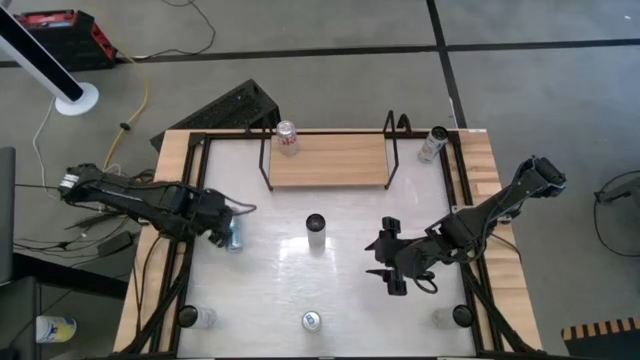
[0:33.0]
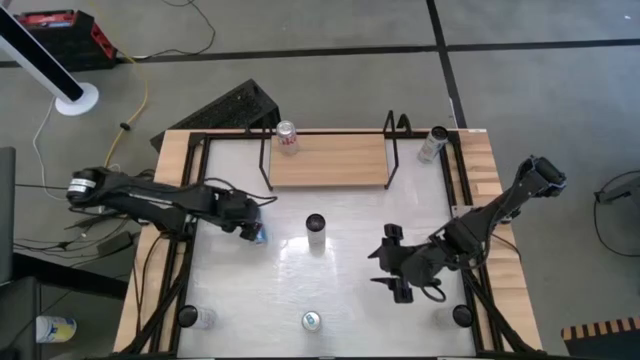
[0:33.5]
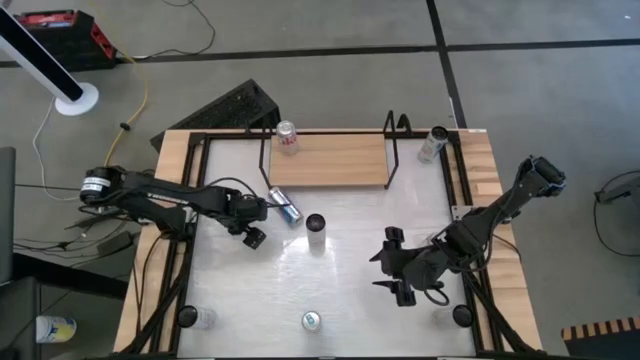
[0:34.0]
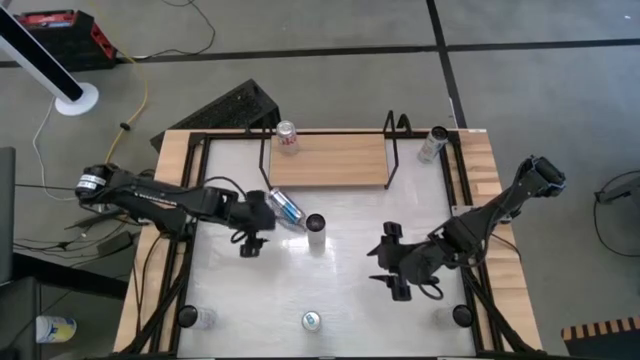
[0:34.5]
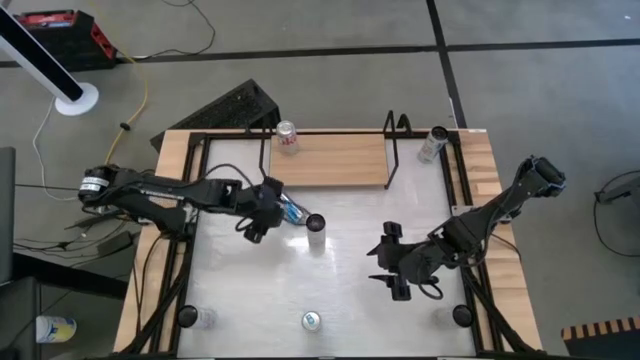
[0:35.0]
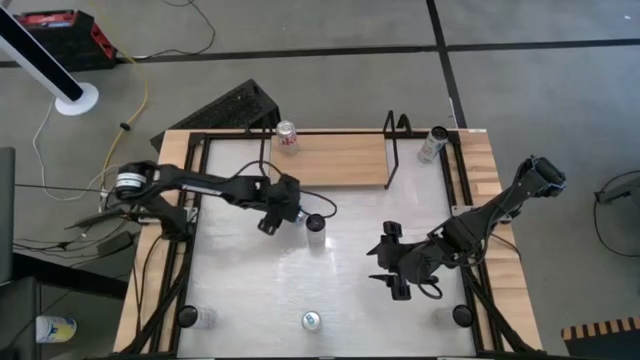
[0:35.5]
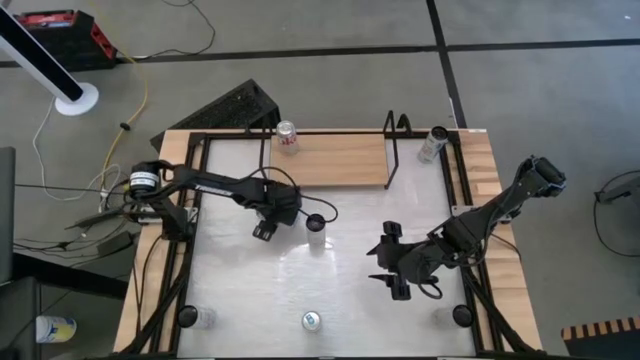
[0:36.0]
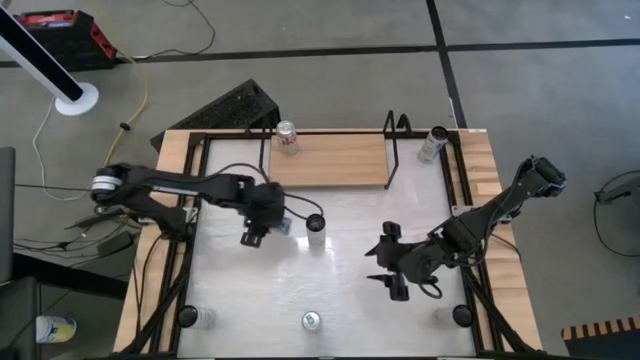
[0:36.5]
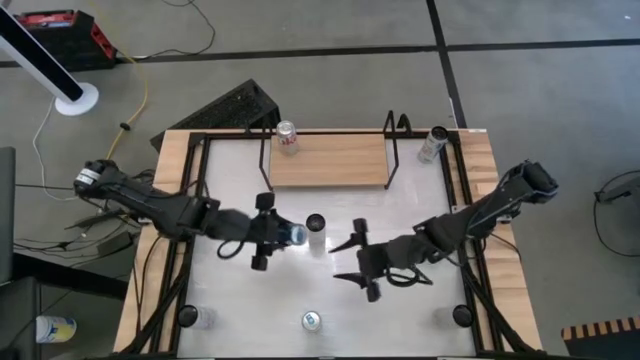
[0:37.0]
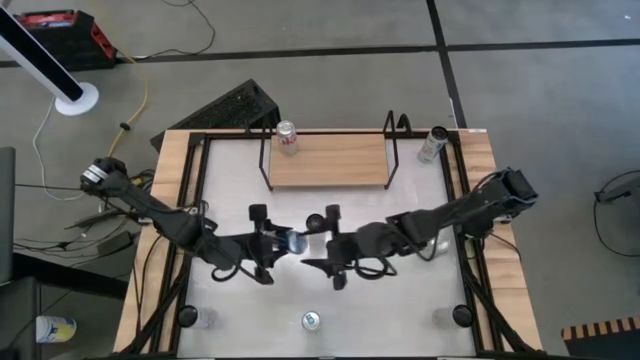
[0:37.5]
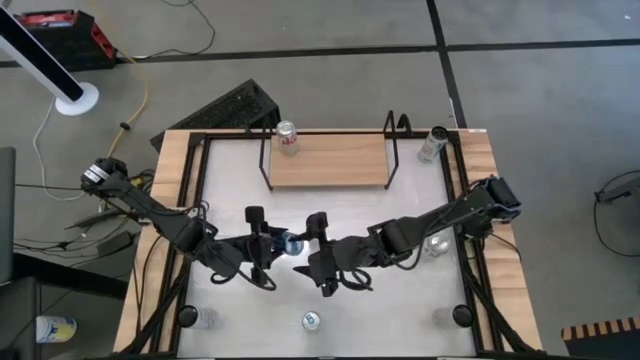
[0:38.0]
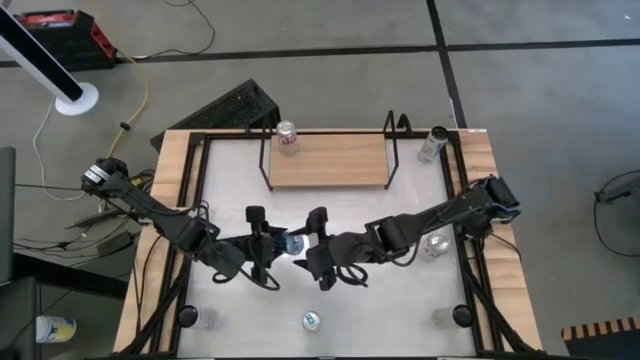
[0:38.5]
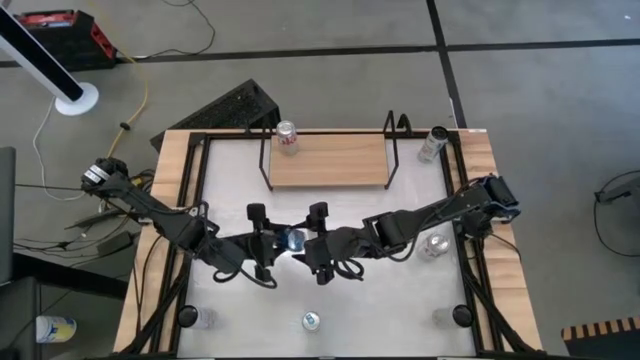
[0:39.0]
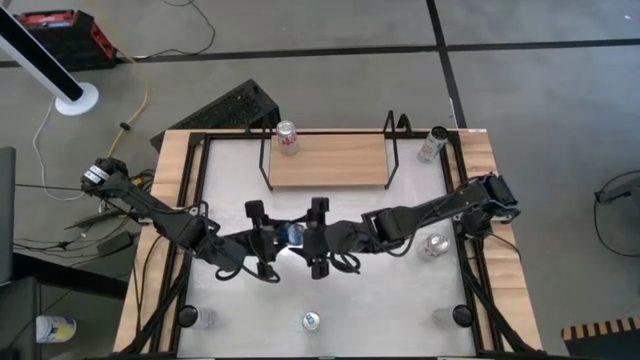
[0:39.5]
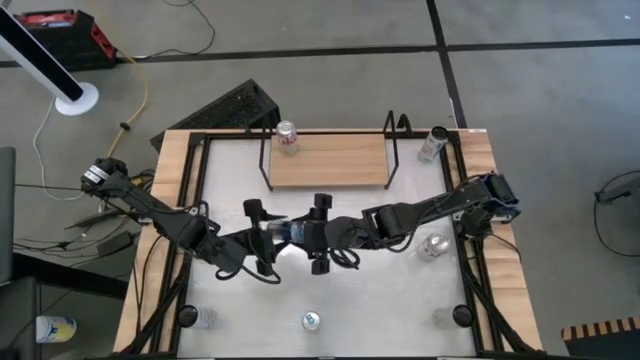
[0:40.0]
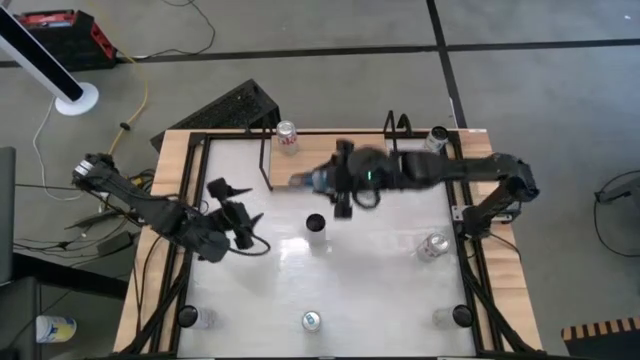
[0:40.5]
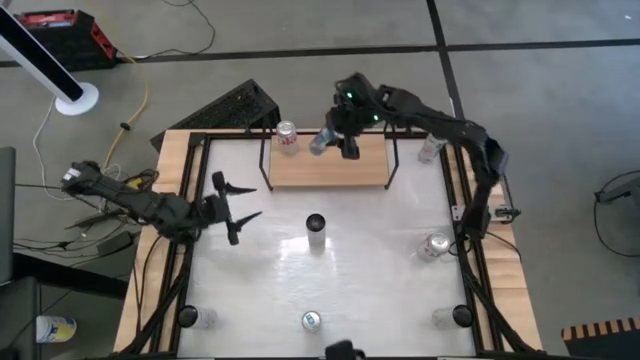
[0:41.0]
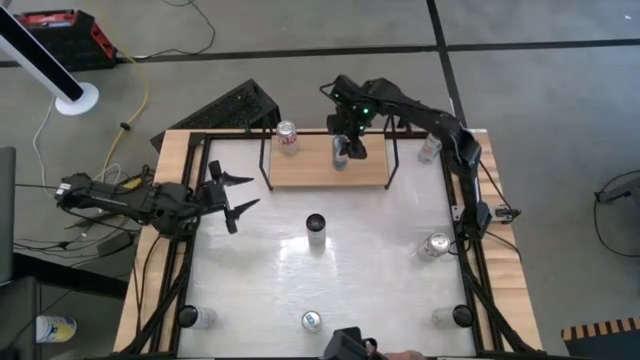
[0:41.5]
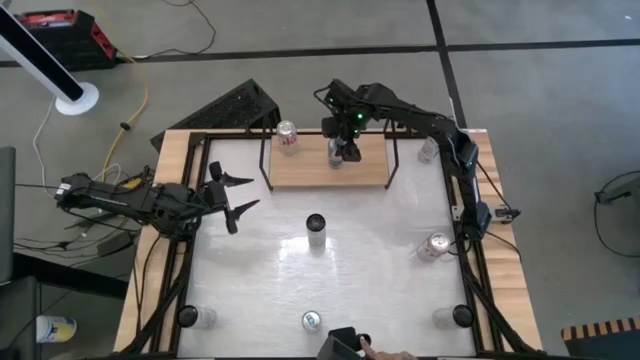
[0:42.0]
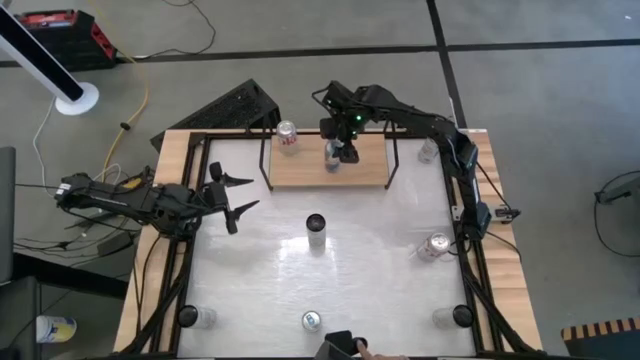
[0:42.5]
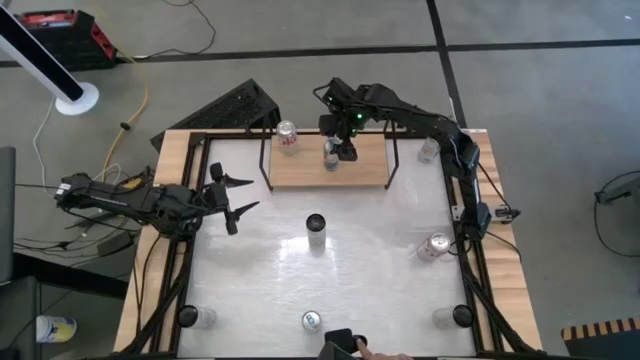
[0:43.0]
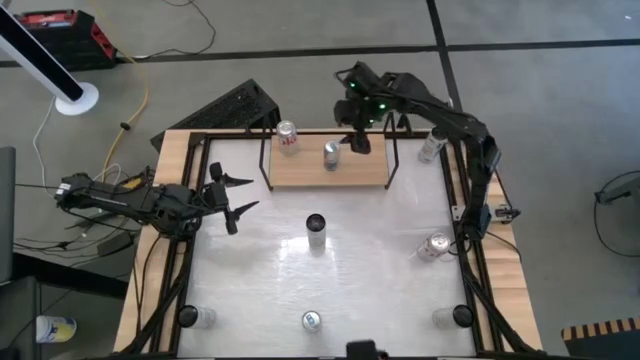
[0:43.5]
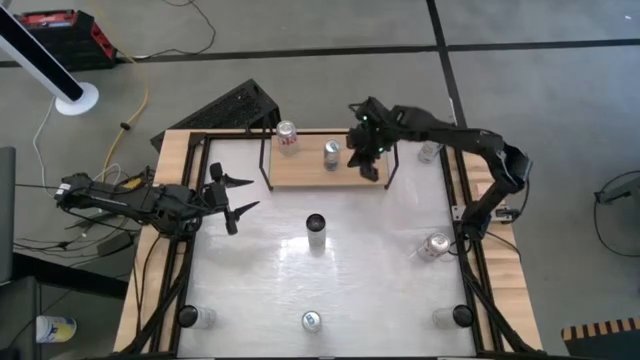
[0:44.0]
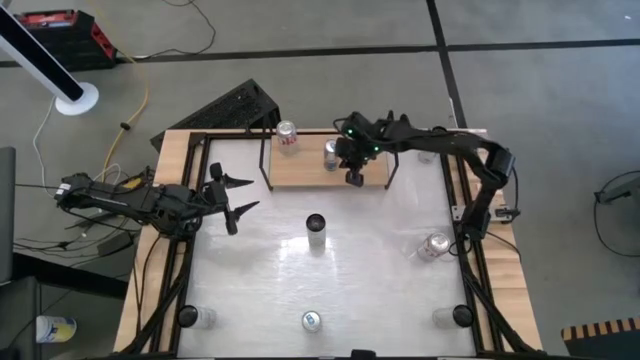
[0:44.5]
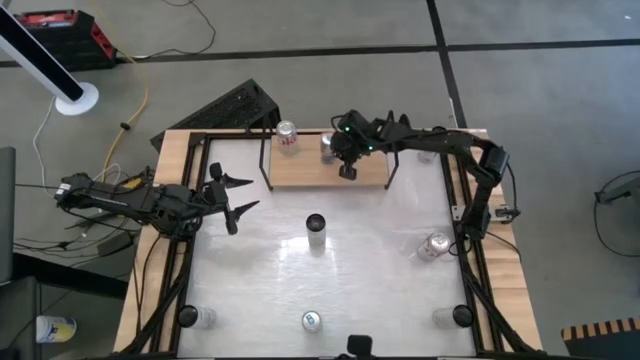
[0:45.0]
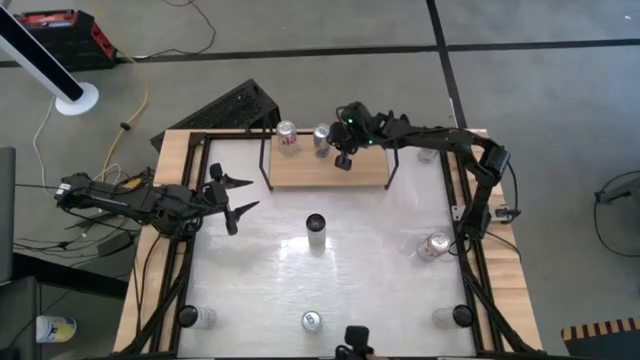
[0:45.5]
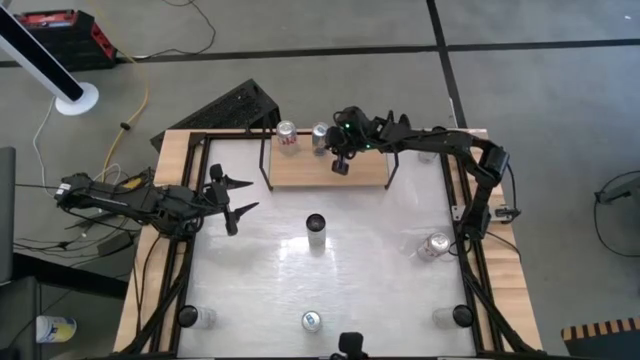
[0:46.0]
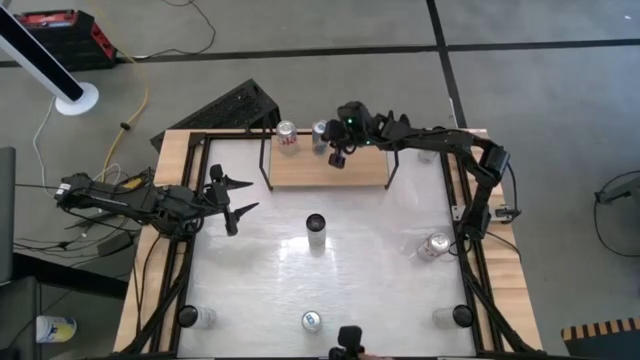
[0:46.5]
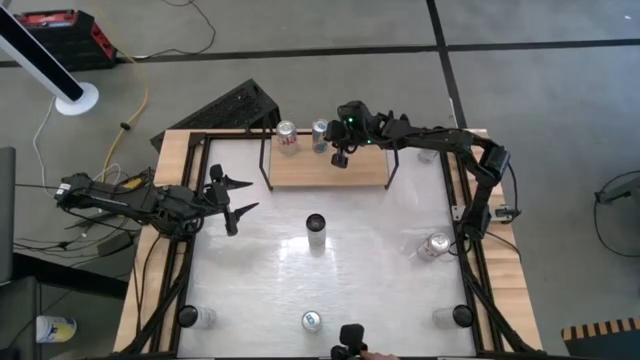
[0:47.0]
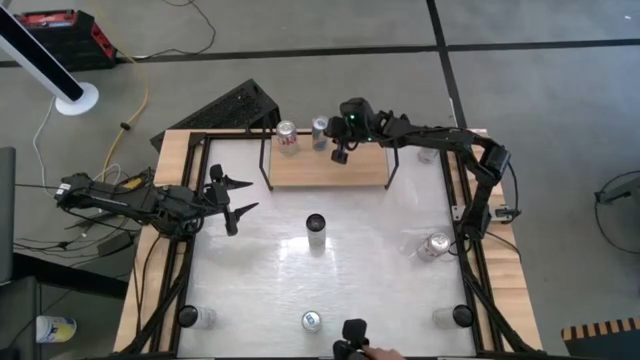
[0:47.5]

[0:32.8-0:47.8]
Task: Place canned beverage on shelf
Put the top left blue soda can on the shelf

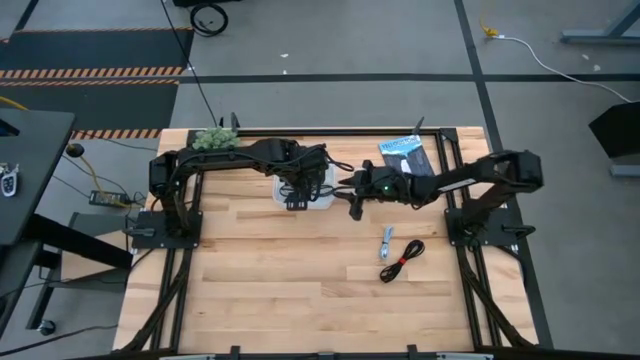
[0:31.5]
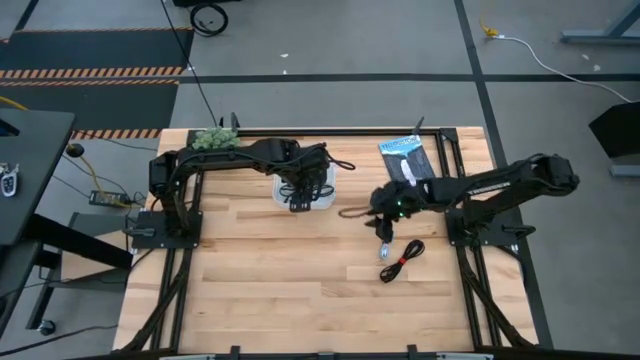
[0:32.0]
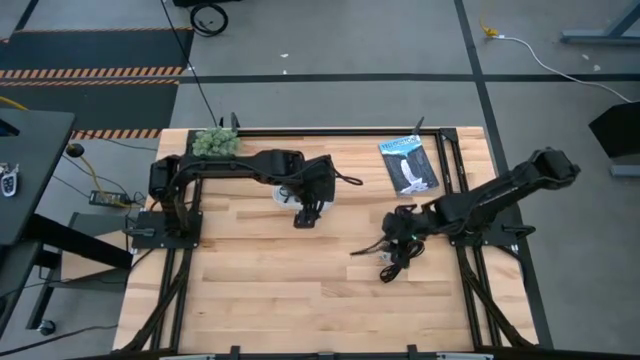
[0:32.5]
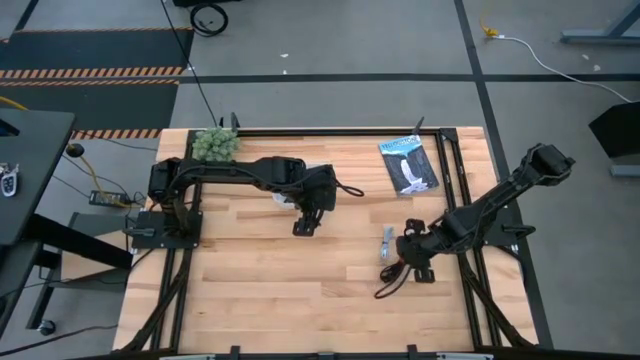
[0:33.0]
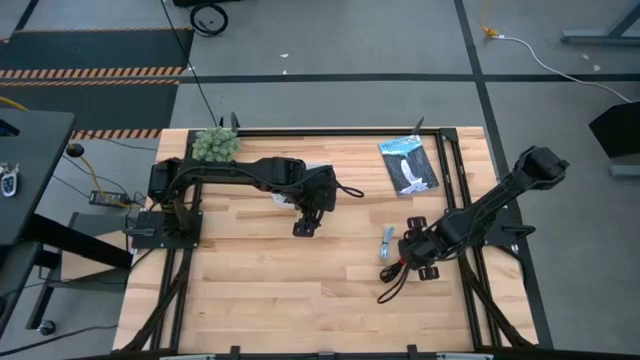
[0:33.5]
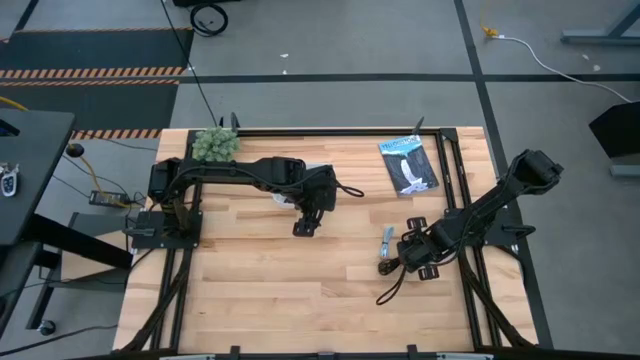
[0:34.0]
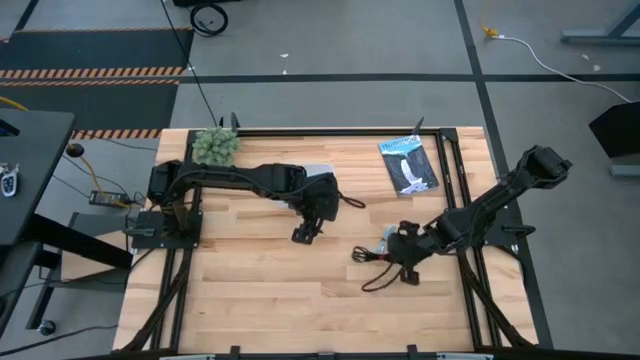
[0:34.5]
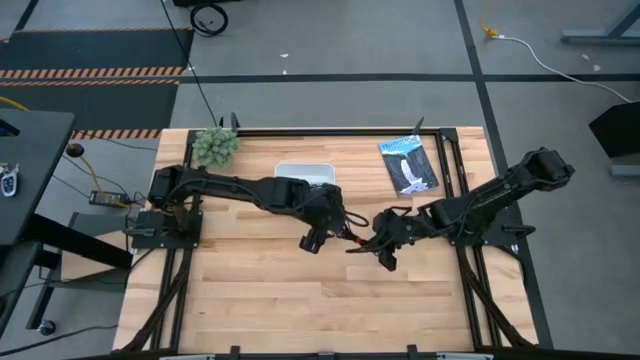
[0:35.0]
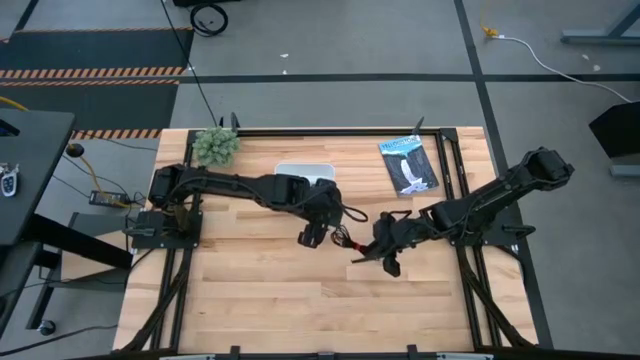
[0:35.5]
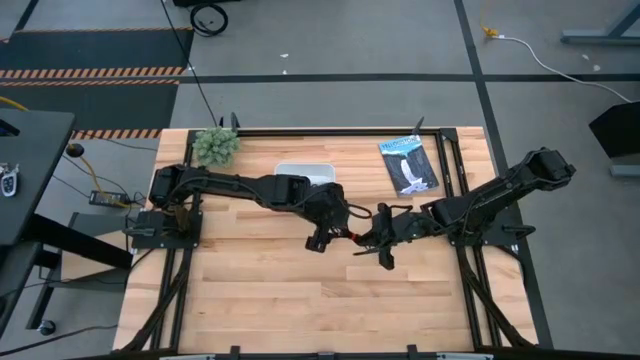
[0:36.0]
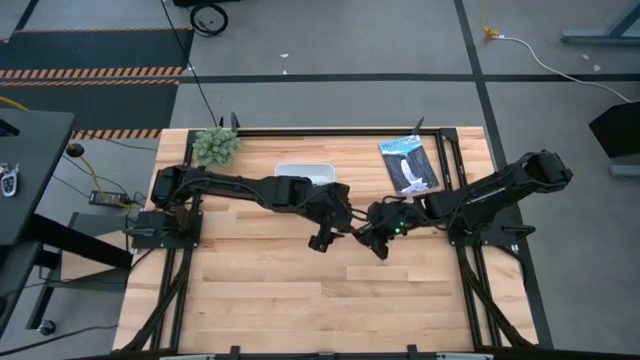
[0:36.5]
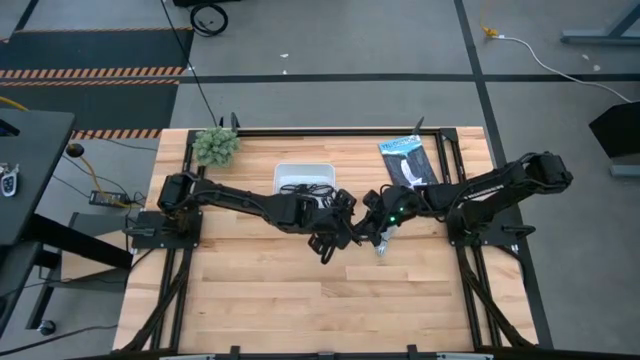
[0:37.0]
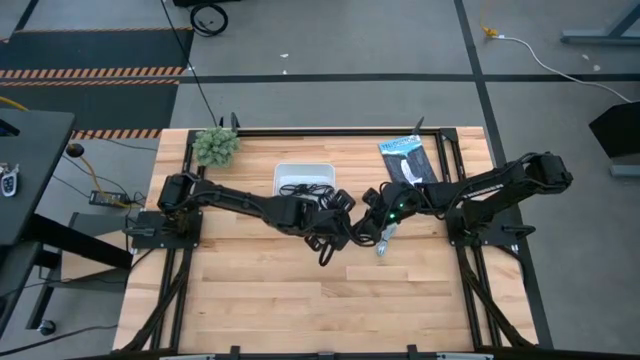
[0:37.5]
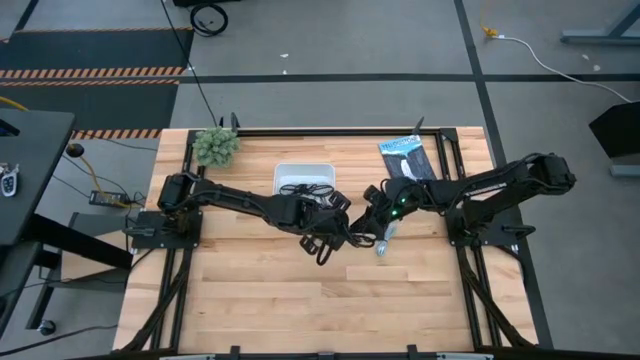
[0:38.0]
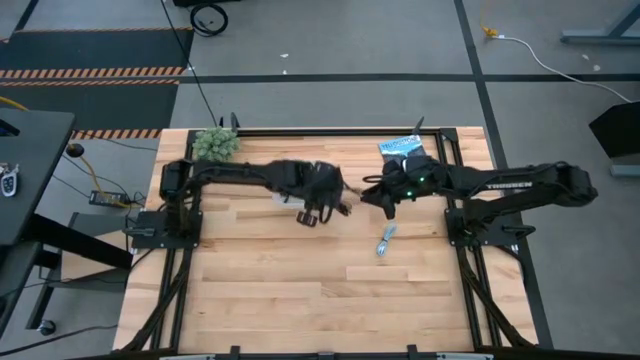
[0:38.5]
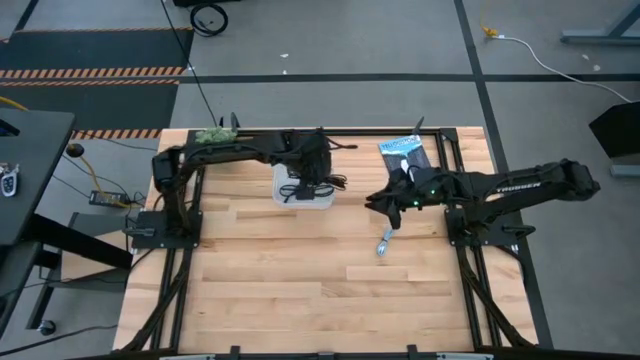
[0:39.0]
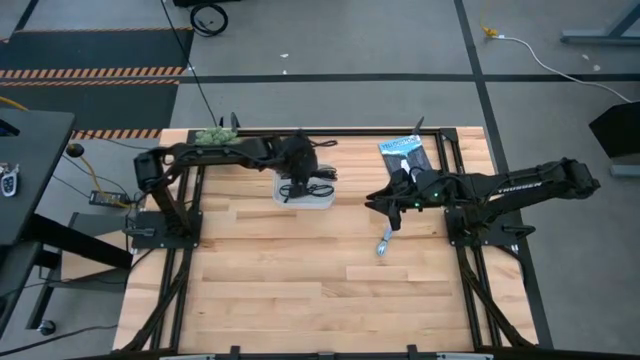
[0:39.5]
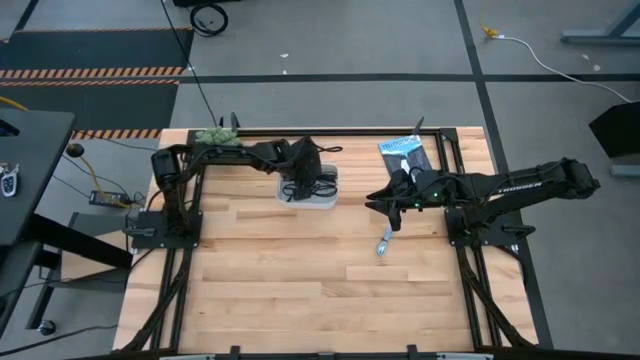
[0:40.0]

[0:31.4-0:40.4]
Task: Pick and place USB-C Cables
Put the black charger cable into the white bin
